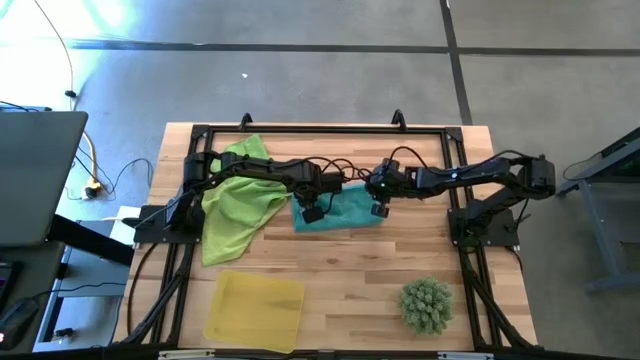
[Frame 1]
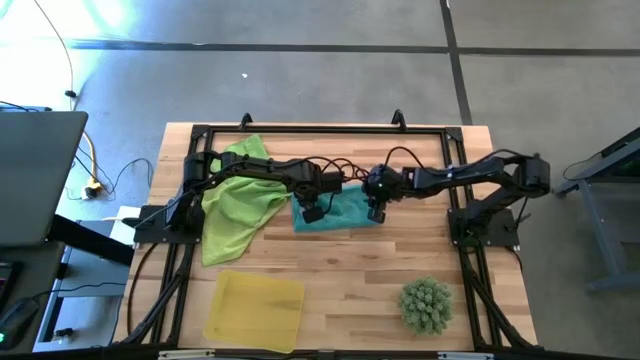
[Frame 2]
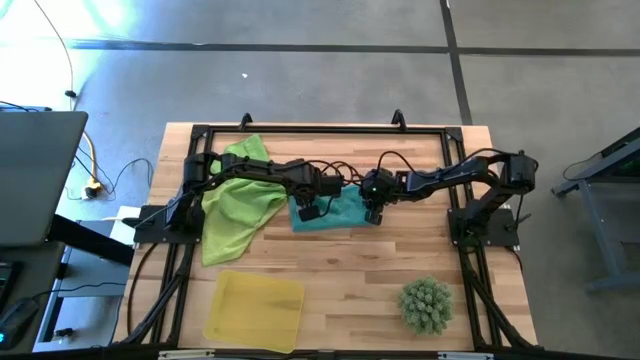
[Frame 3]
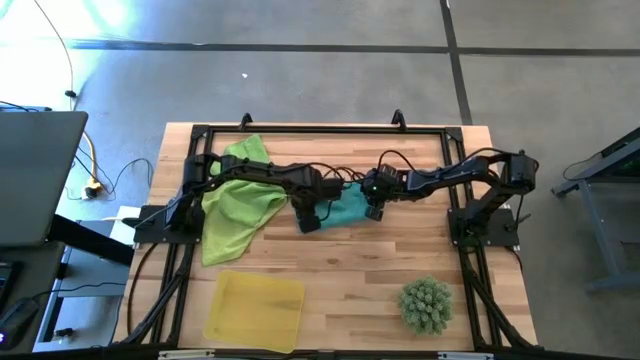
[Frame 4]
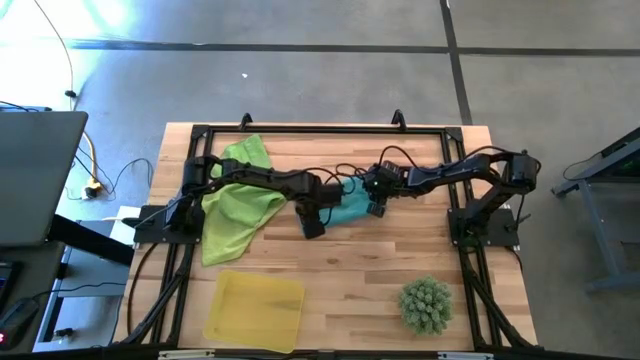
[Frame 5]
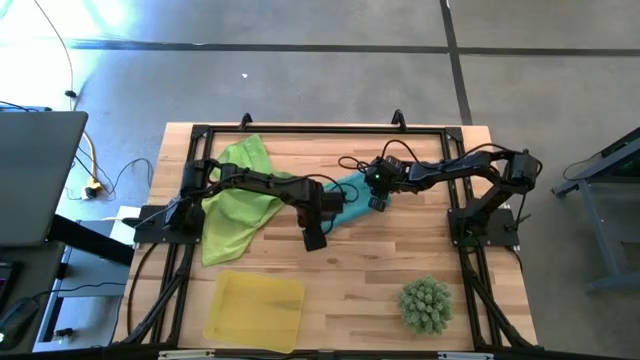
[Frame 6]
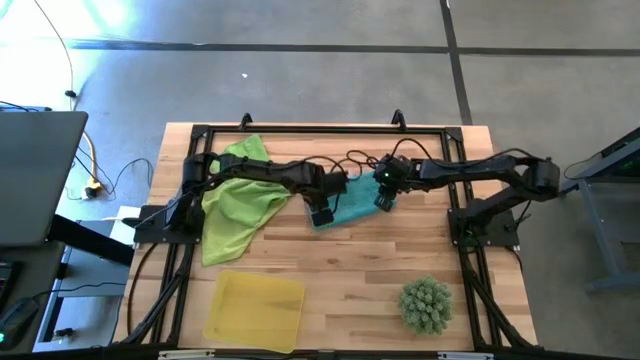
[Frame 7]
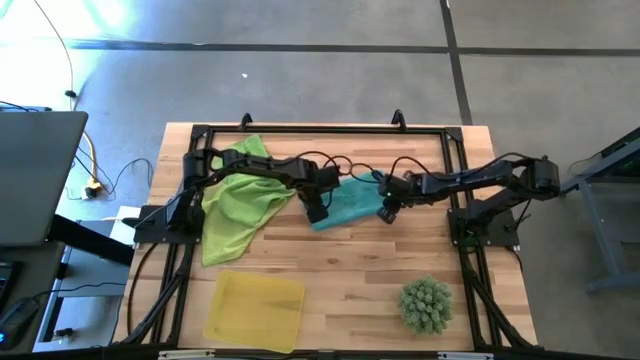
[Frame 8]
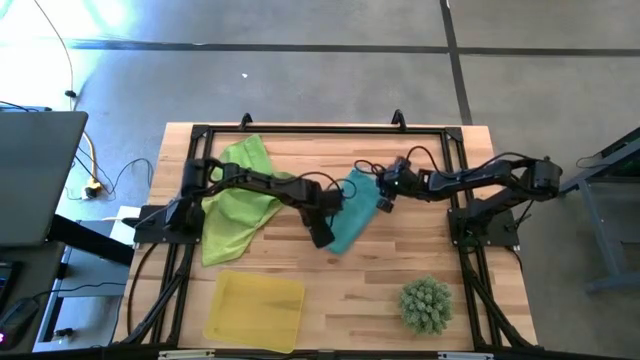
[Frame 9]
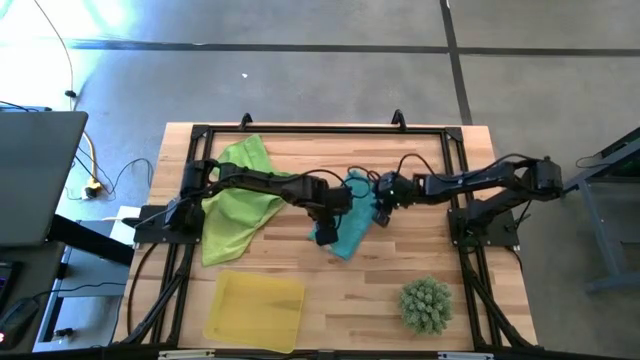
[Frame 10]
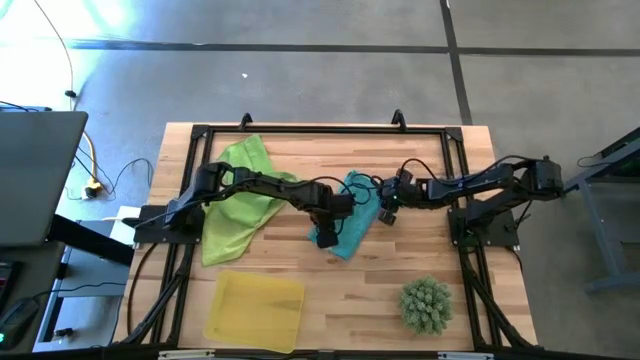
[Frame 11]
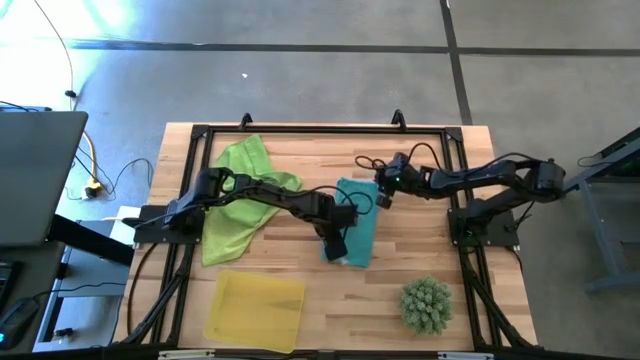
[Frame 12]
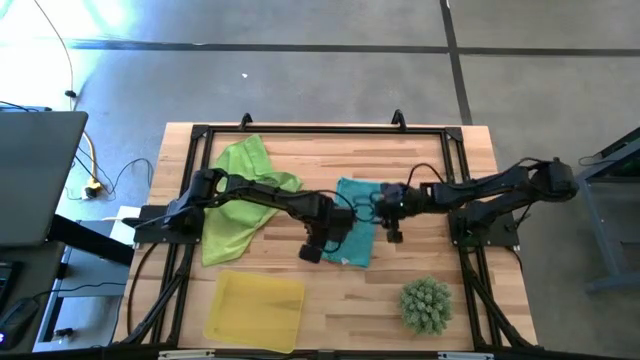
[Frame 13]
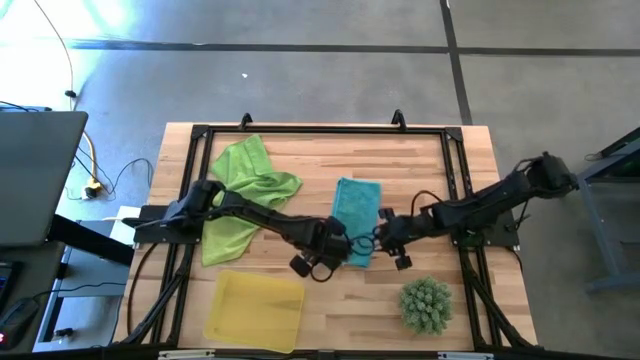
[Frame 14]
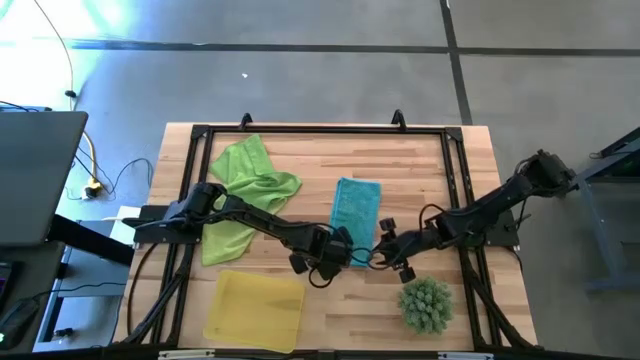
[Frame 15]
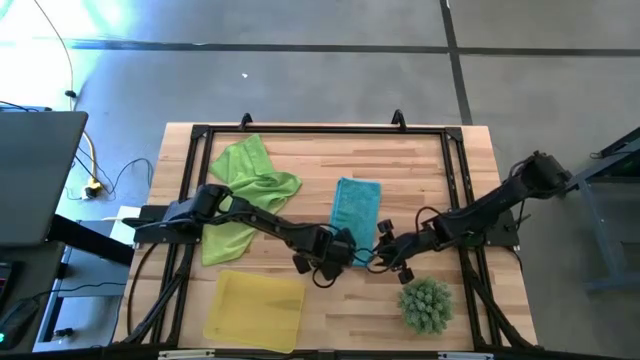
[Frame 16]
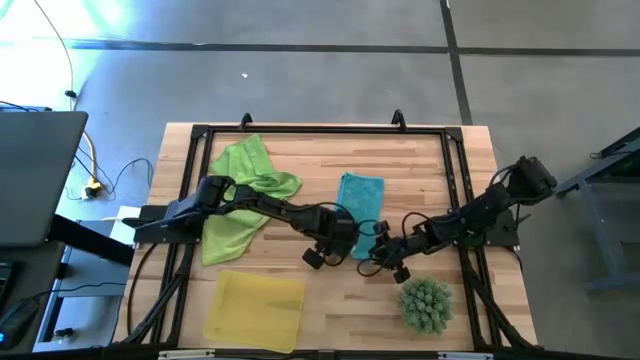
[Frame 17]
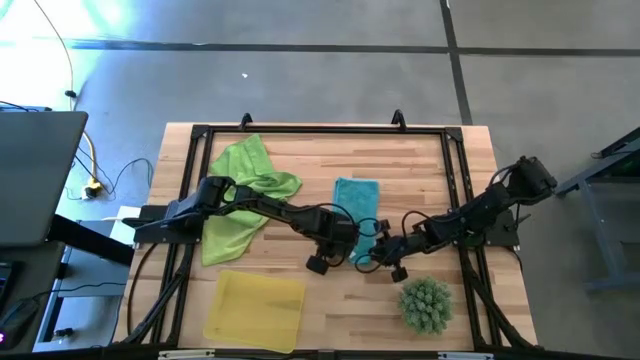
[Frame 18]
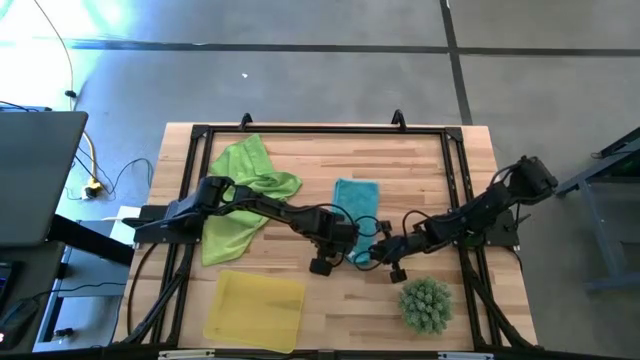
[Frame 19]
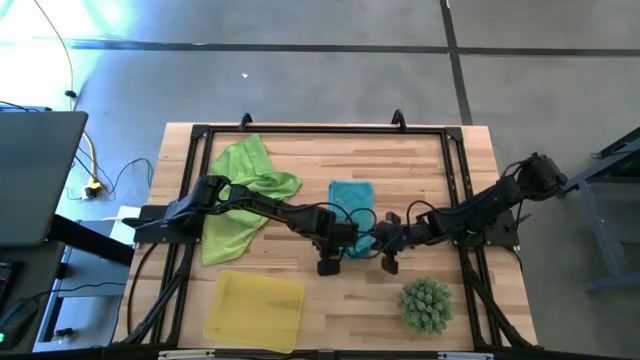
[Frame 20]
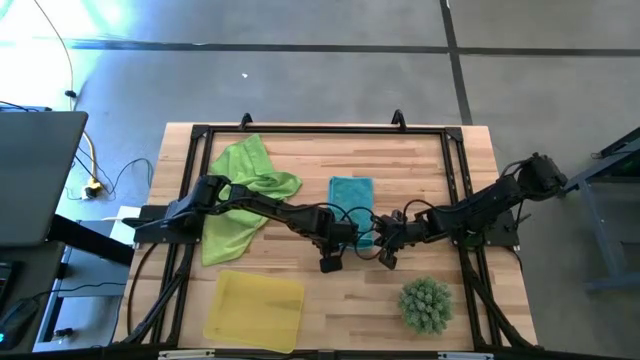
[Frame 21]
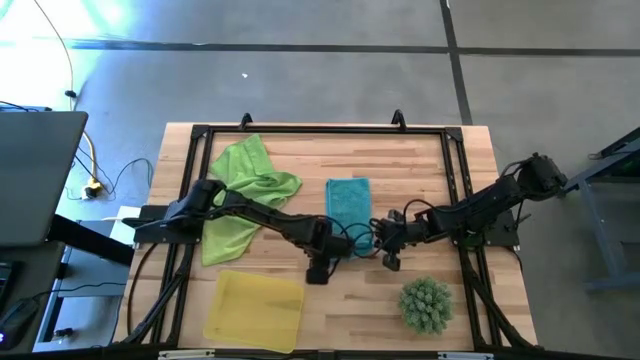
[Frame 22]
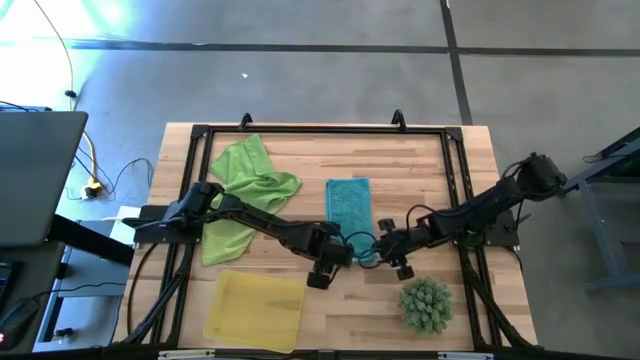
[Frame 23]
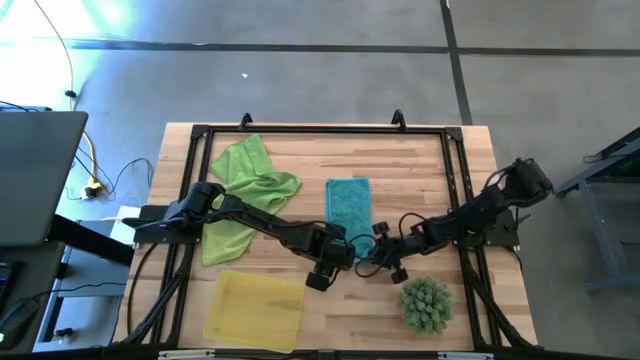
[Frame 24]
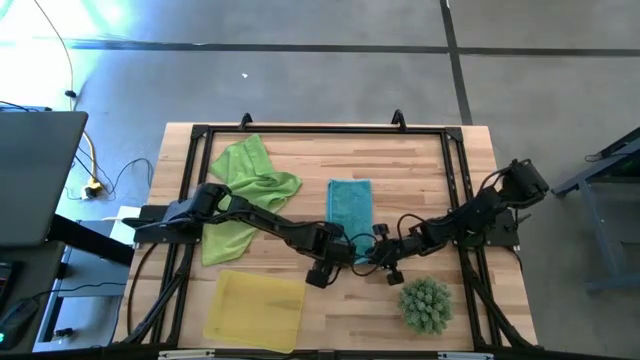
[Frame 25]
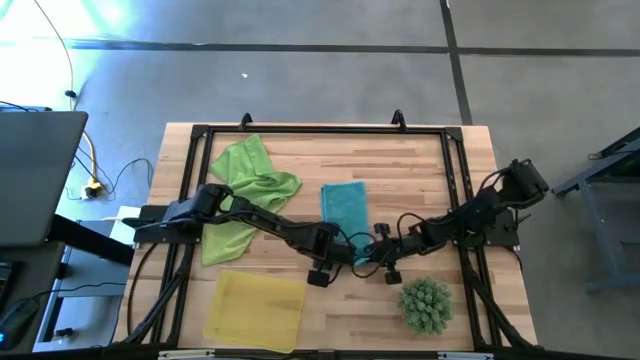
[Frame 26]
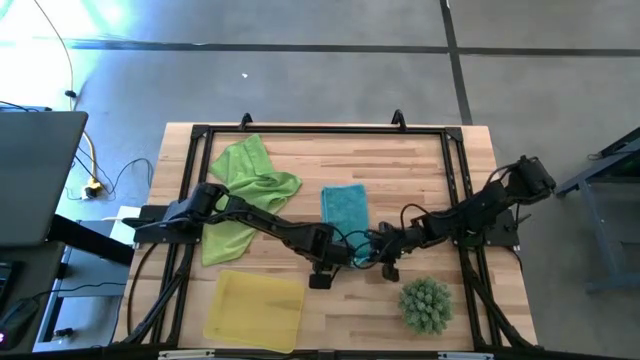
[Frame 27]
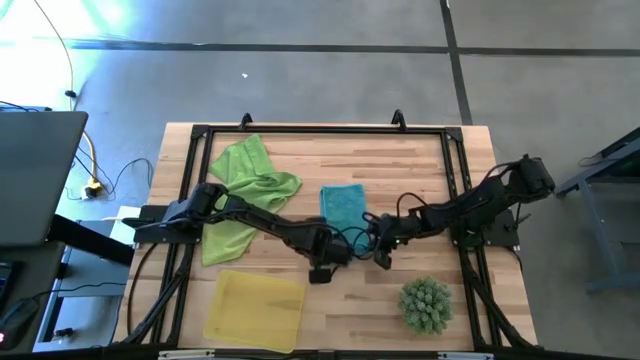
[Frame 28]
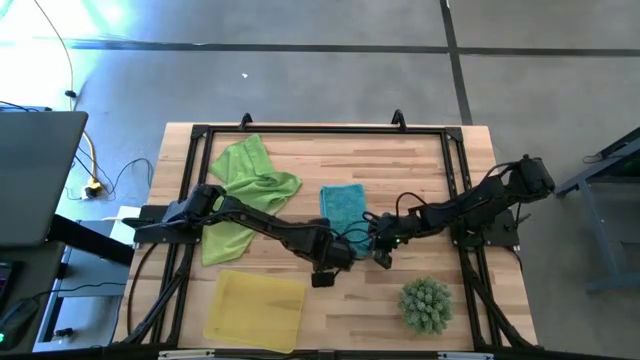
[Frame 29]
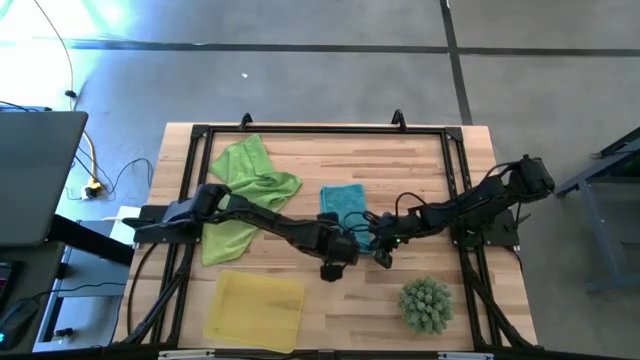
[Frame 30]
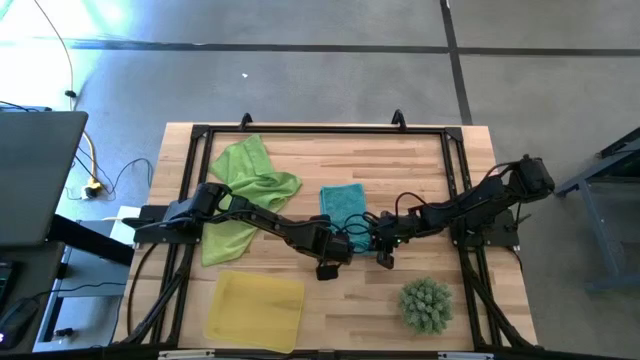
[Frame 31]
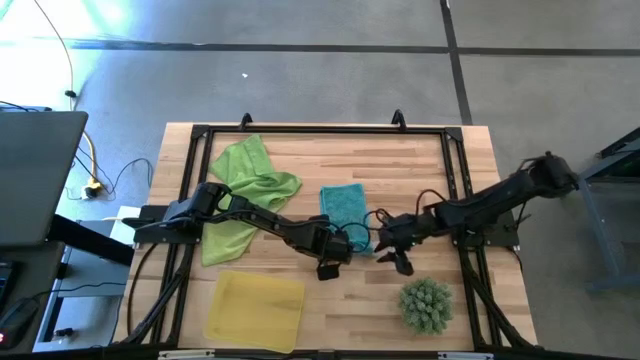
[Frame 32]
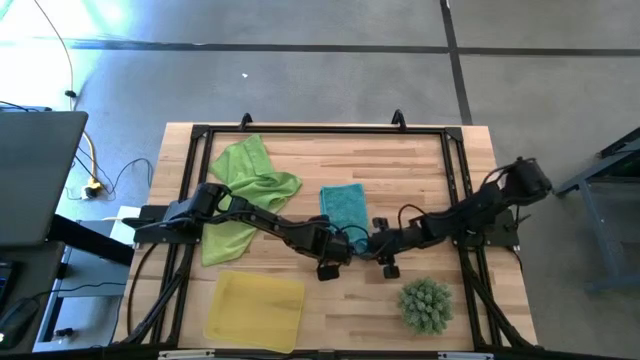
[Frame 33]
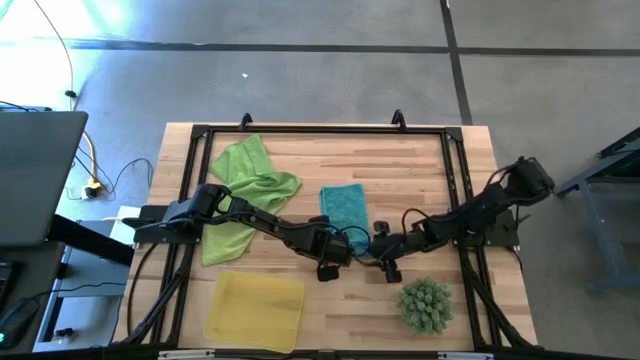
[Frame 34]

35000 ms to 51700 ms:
Task: Roll microfiber towels into tight, uniform cylinder then place into a basket
Roll the blue microfiber towel
